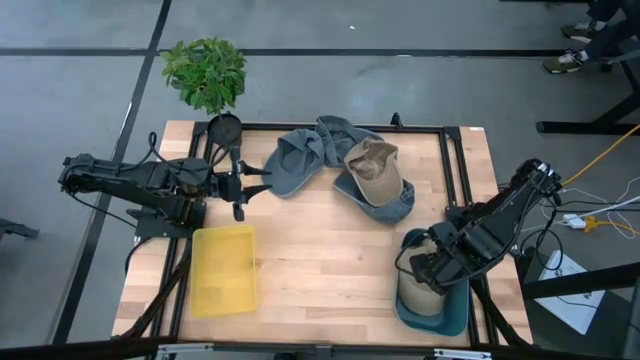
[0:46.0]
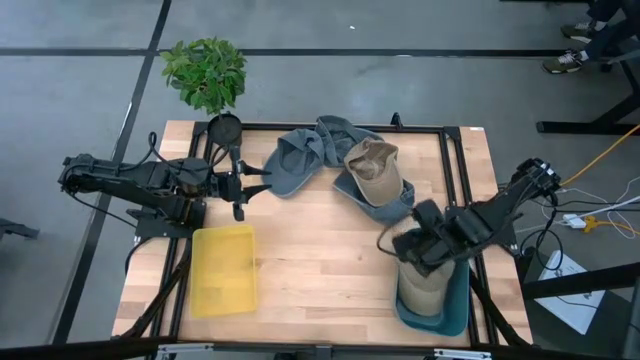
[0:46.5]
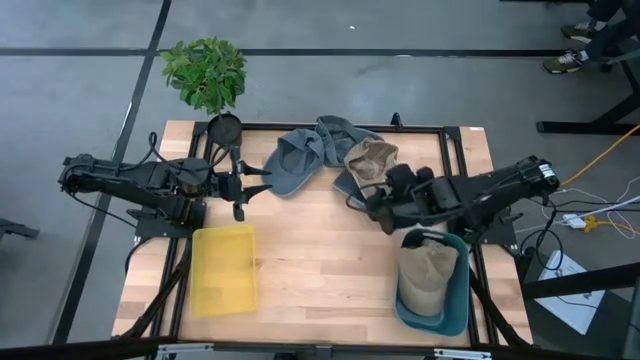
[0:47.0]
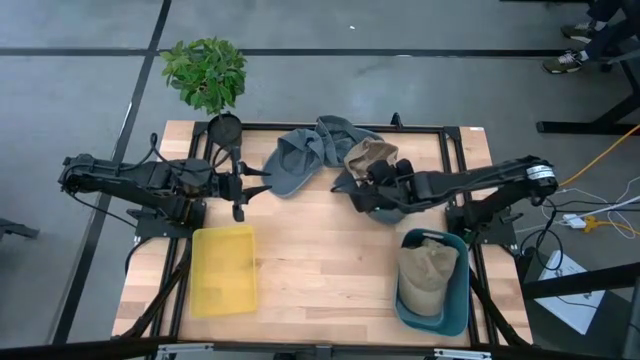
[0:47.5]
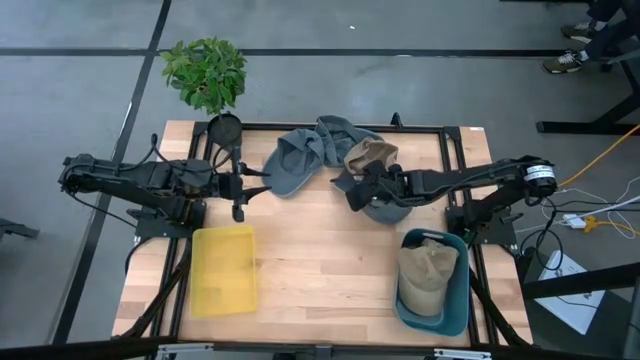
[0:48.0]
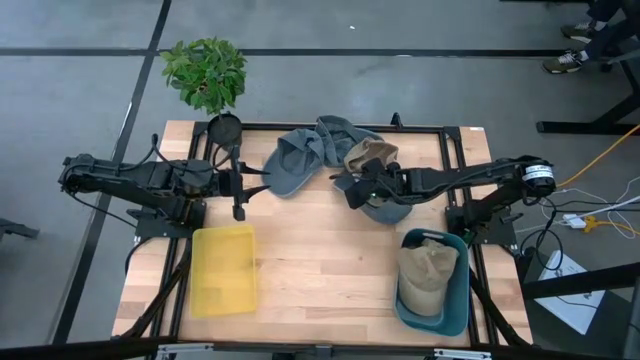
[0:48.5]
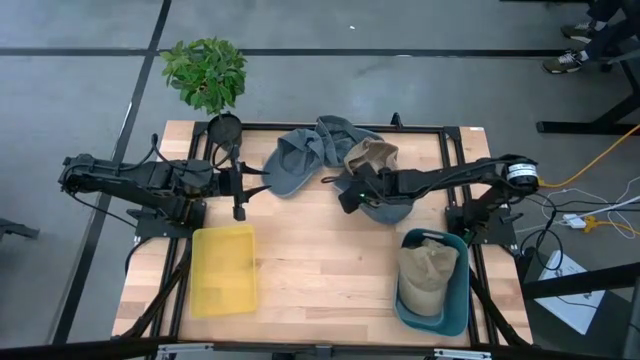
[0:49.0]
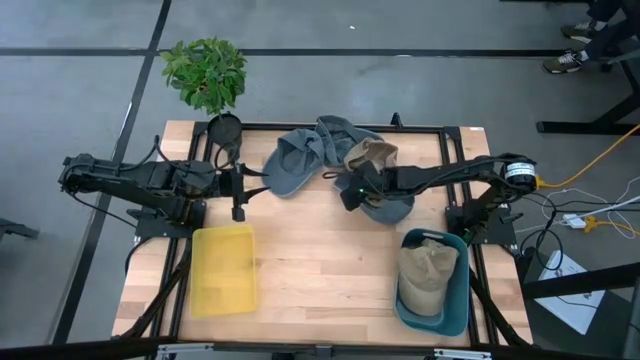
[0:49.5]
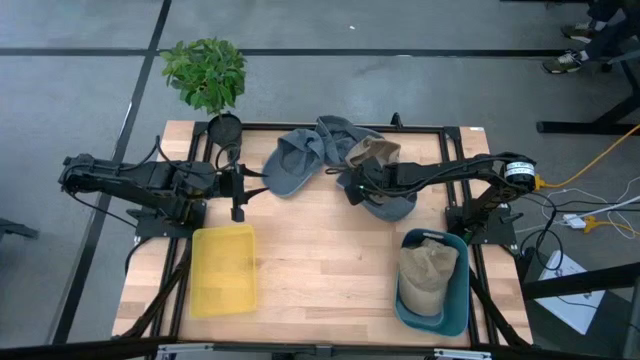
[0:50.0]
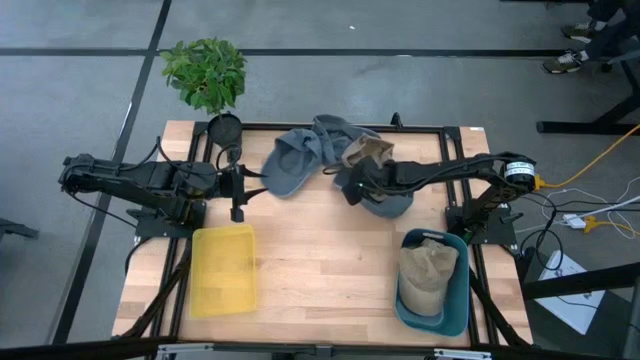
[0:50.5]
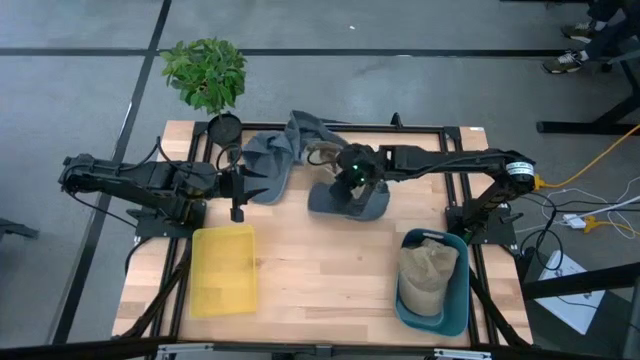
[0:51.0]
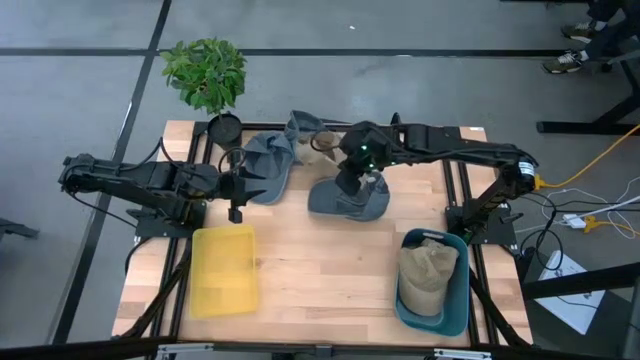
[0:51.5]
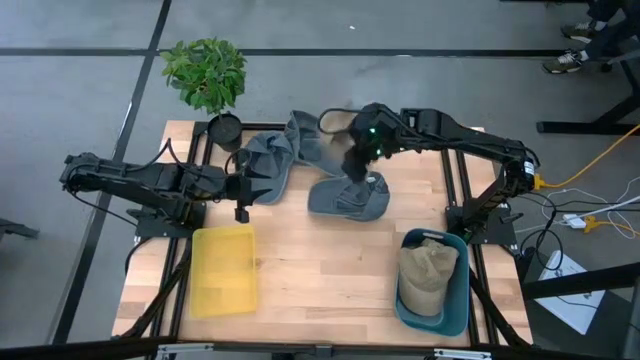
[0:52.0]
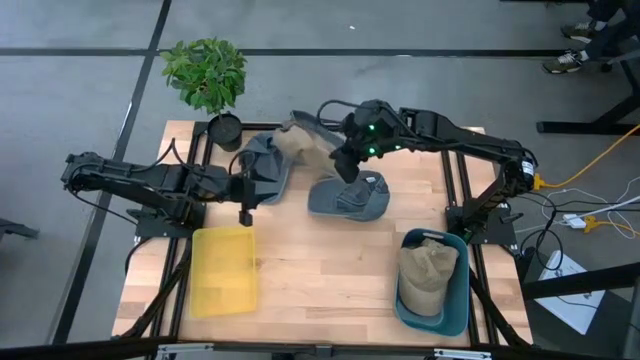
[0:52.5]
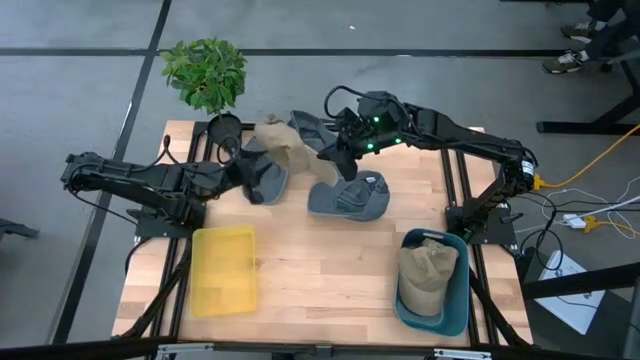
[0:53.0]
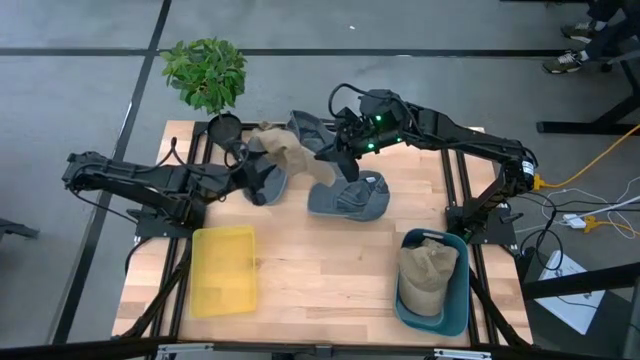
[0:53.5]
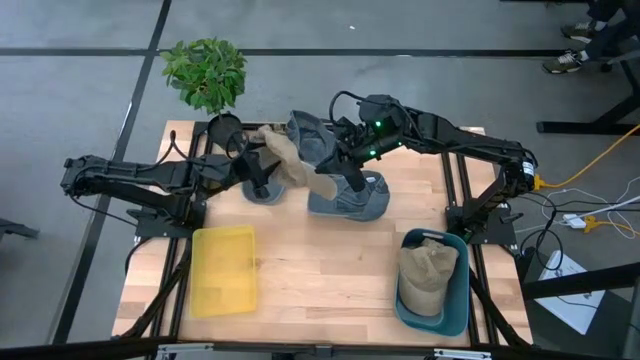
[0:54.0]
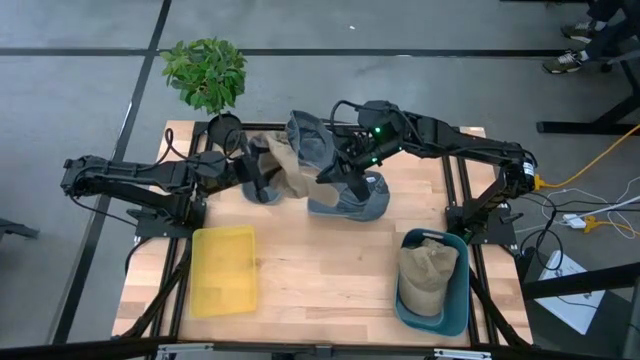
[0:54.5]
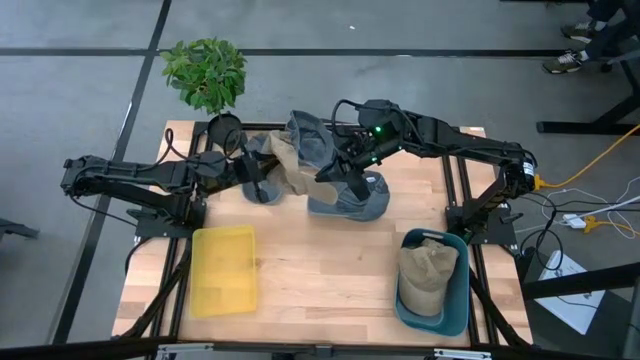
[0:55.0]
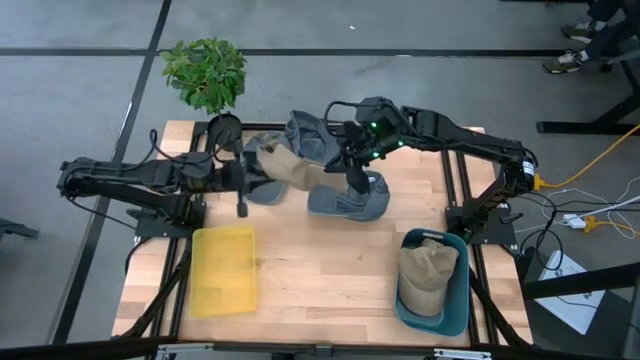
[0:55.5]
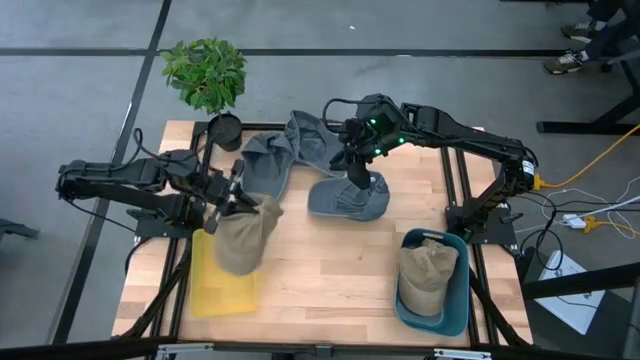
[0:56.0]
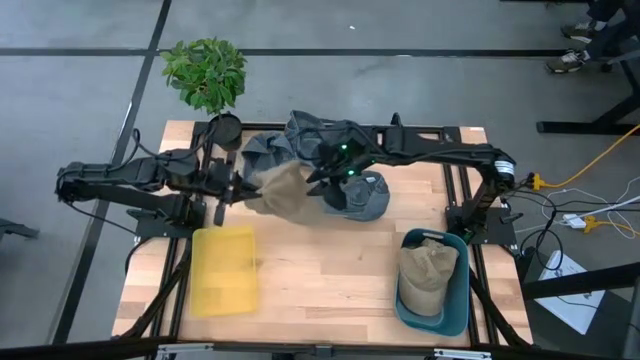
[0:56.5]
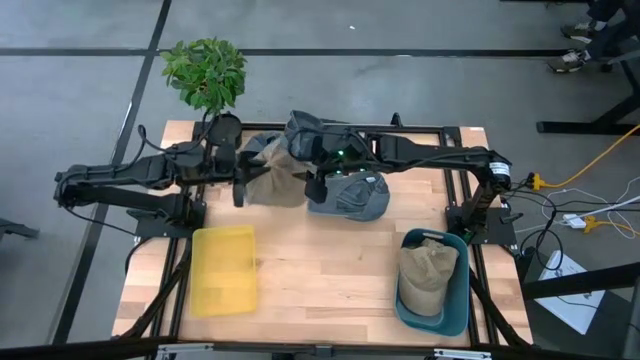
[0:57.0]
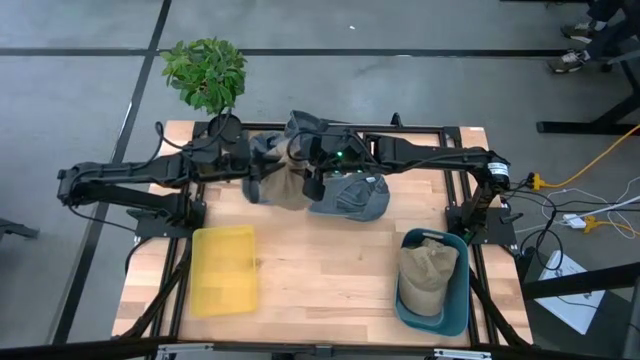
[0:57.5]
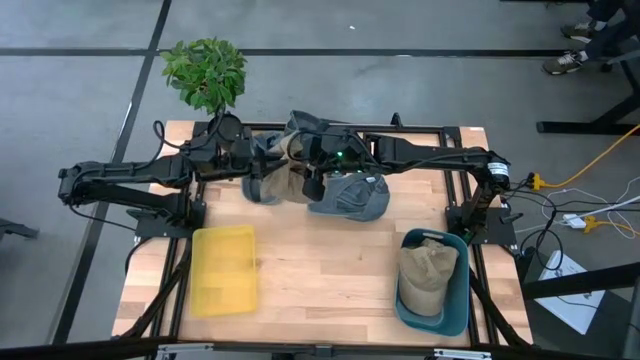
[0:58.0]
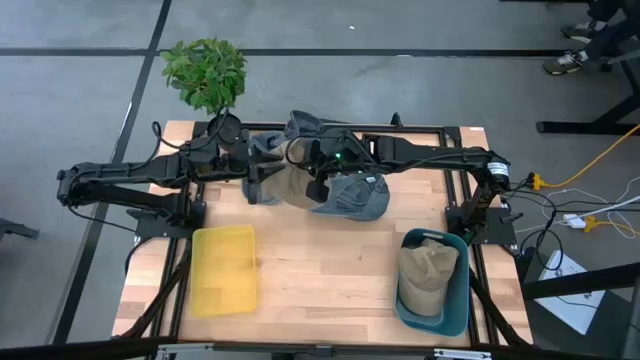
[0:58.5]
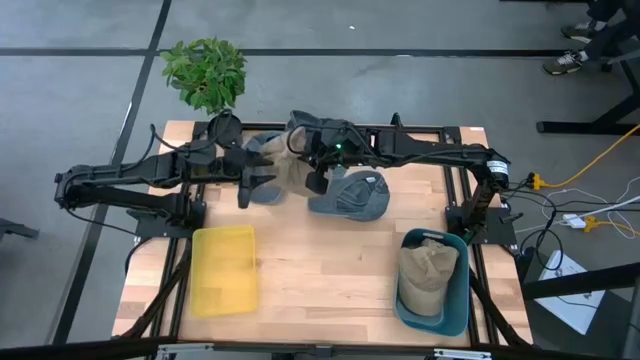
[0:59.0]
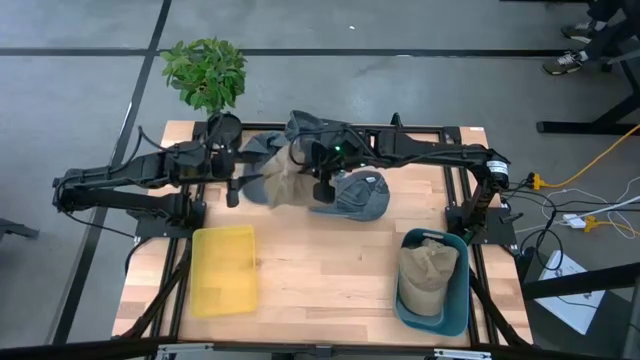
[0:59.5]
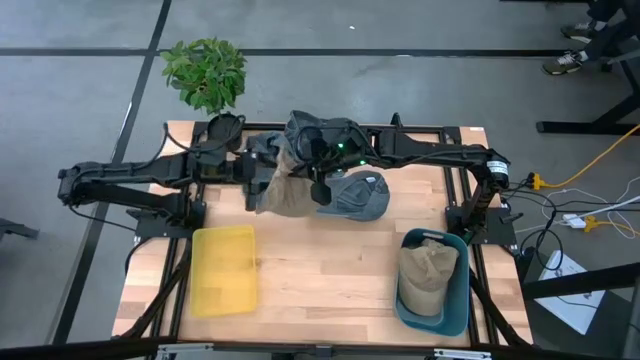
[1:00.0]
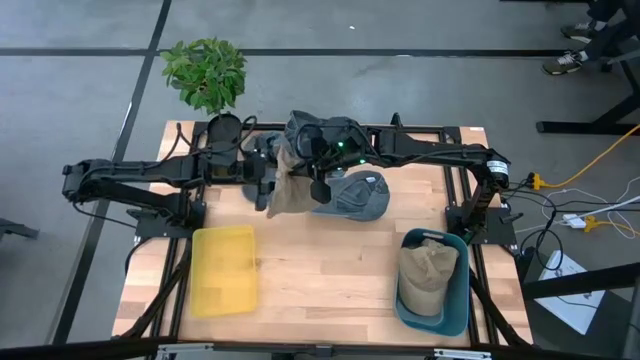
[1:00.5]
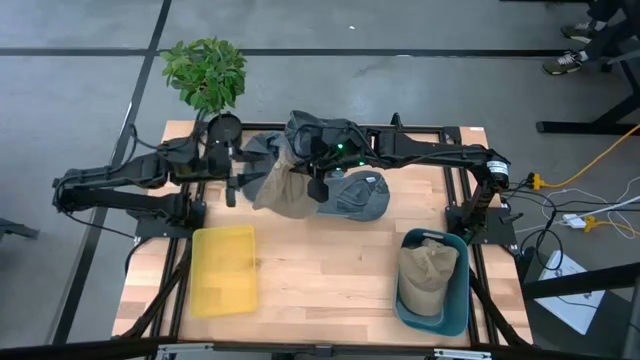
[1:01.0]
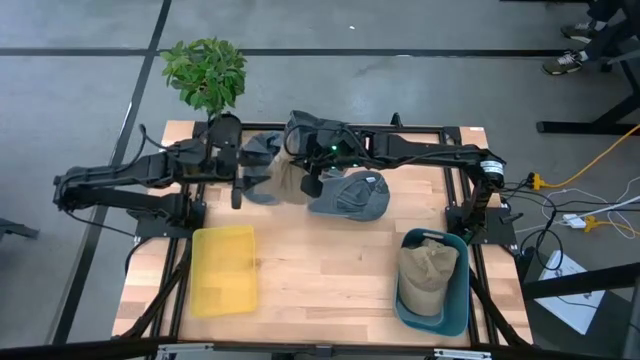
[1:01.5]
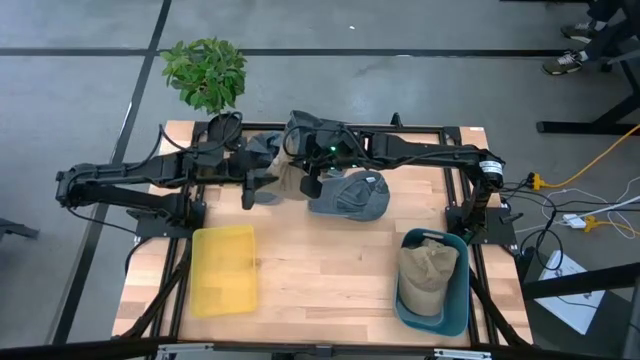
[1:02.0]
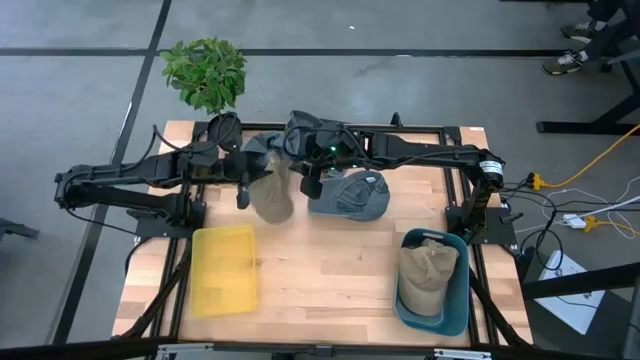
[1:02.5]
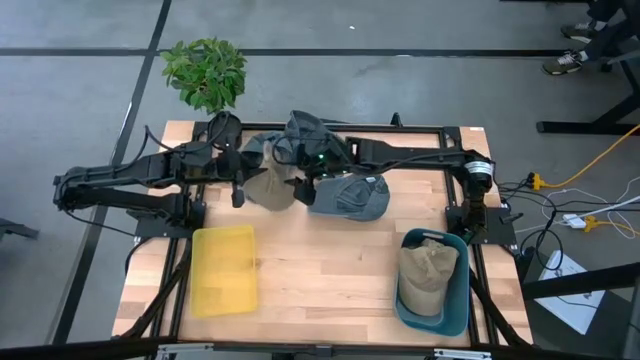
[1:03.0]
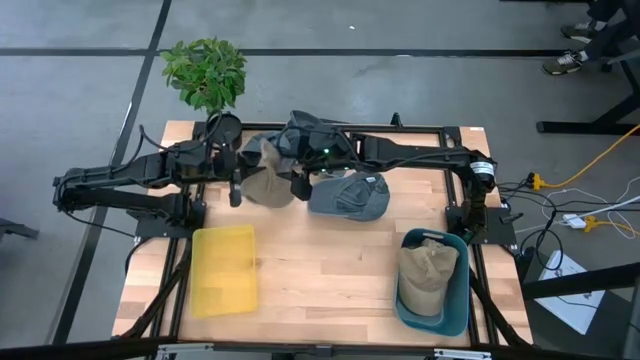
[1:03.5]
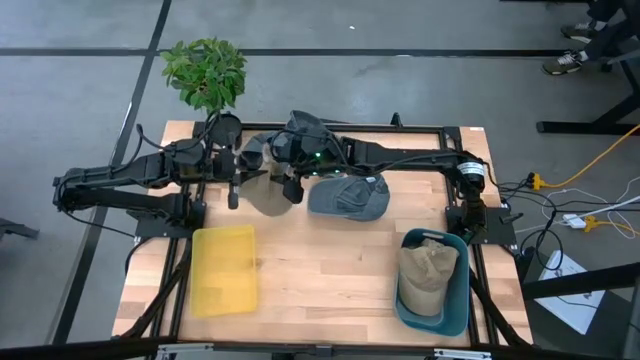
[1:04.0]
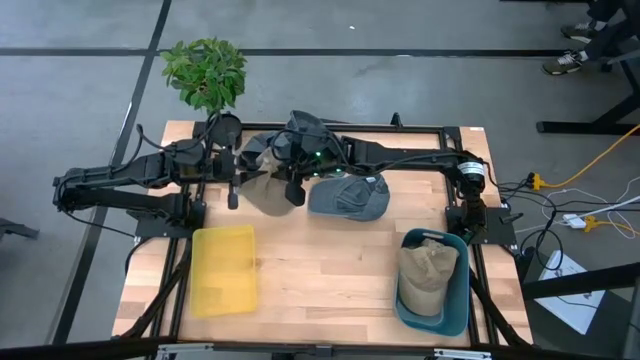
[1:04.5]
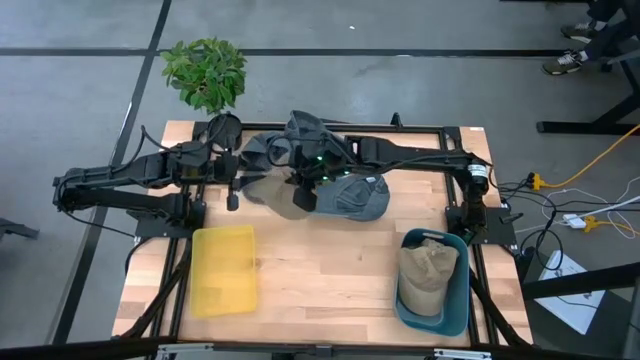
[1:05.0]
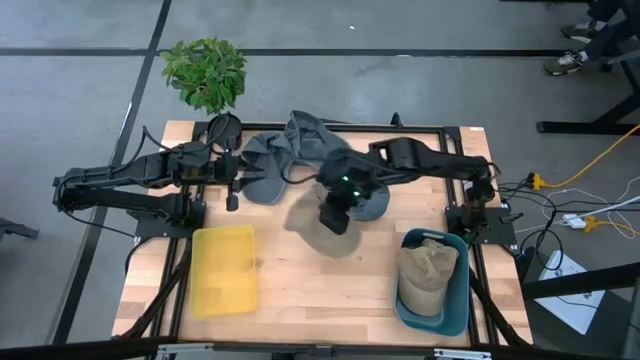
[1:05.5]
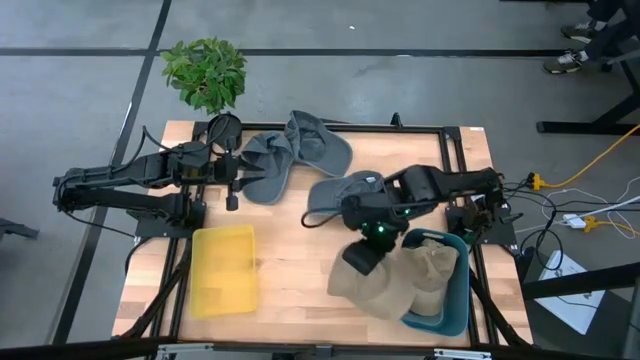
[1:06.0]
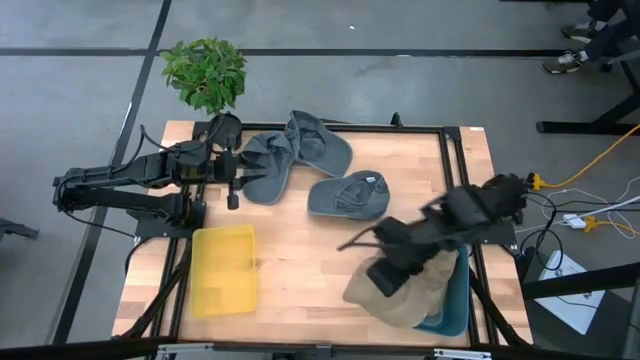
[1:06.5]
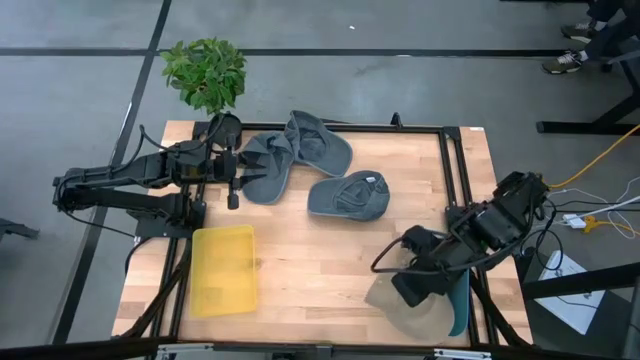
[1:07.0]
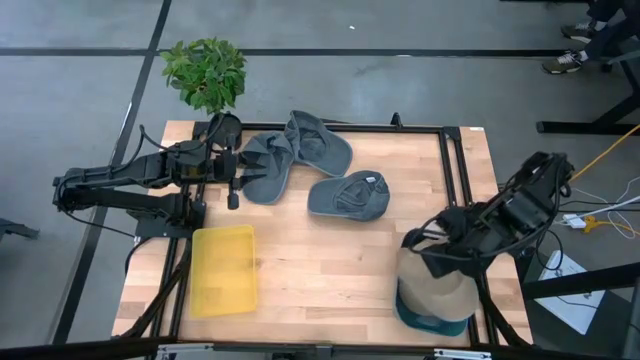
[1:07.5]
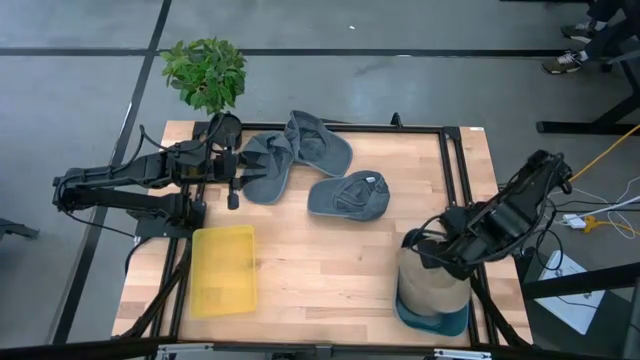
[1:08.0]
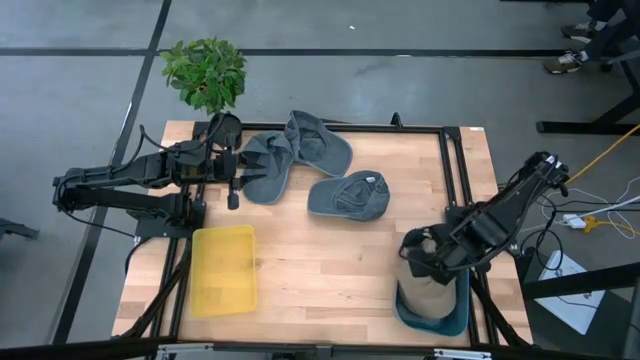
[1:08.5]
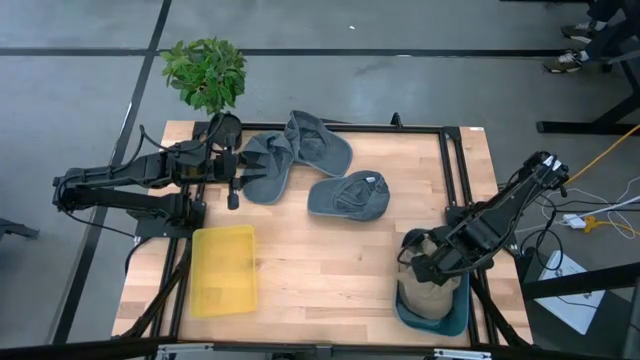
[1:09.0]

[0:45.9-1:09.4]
Task: Pick & Place hat
Put the brown cap into the blue bin
